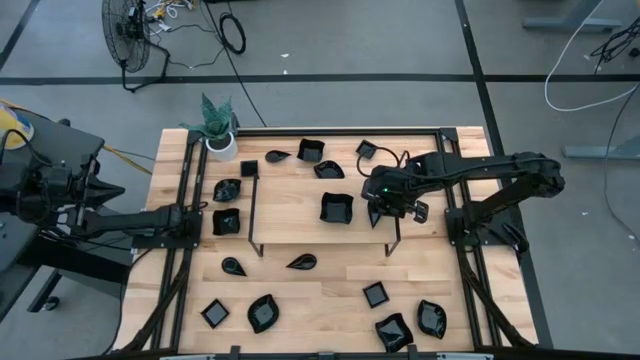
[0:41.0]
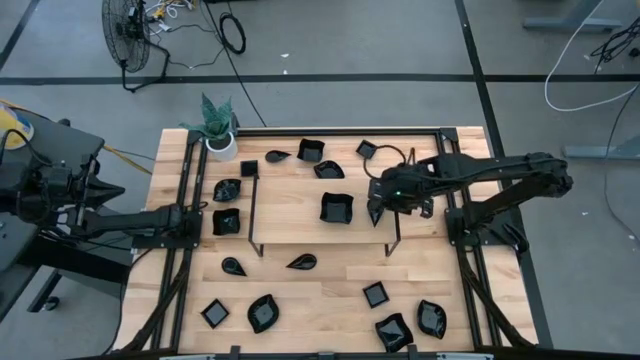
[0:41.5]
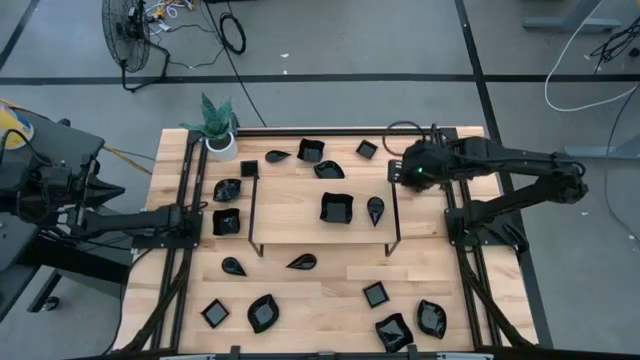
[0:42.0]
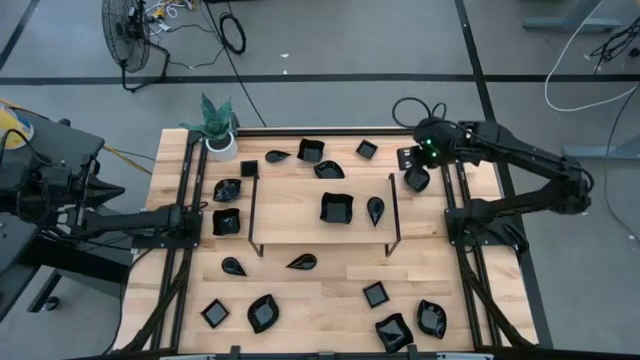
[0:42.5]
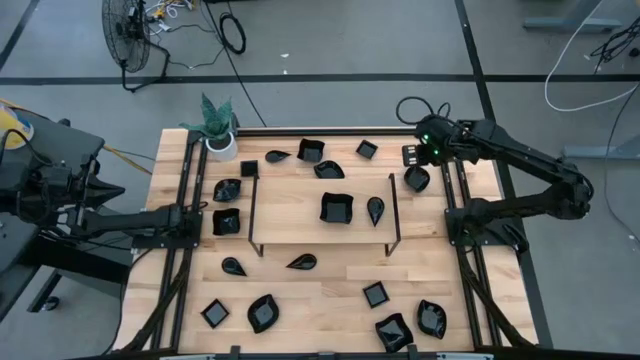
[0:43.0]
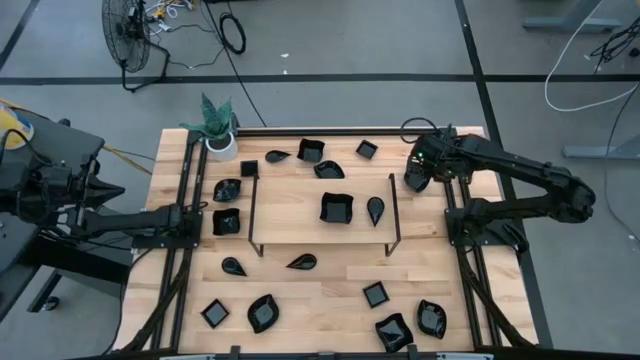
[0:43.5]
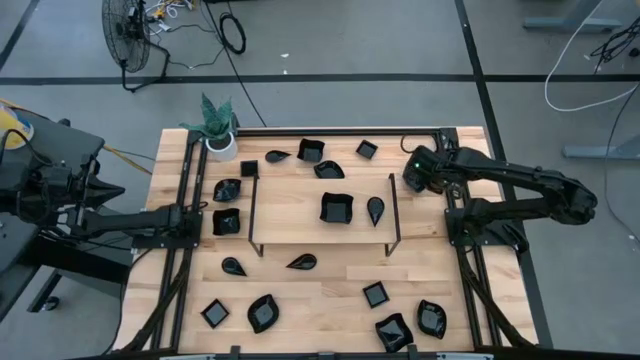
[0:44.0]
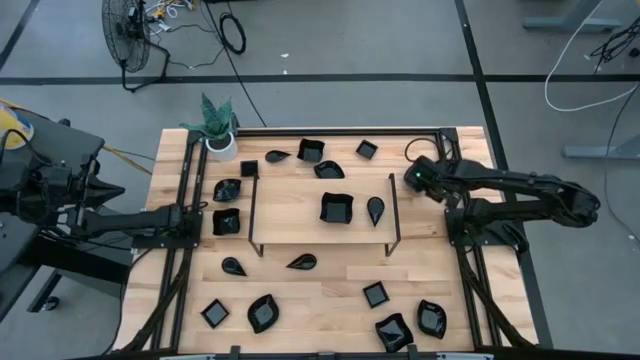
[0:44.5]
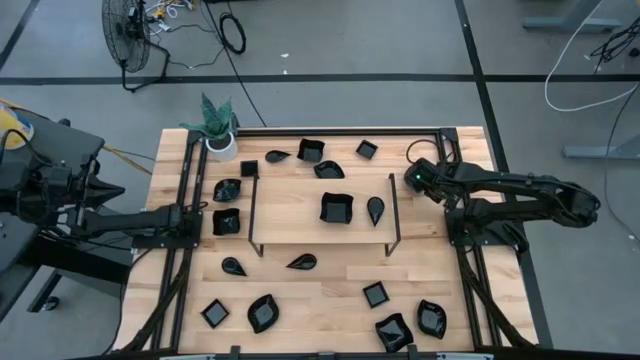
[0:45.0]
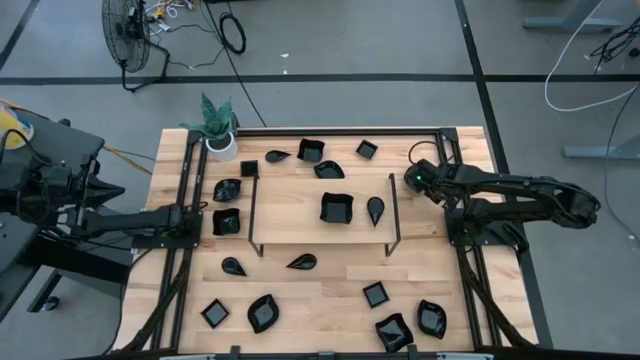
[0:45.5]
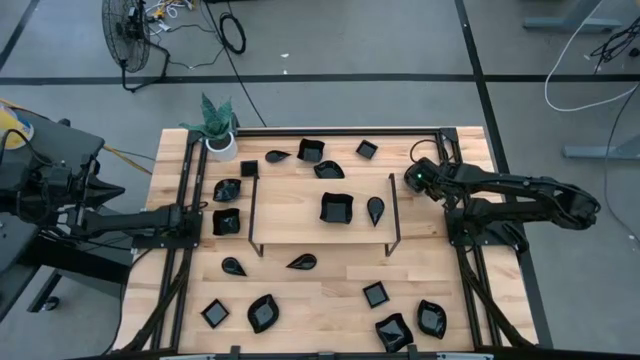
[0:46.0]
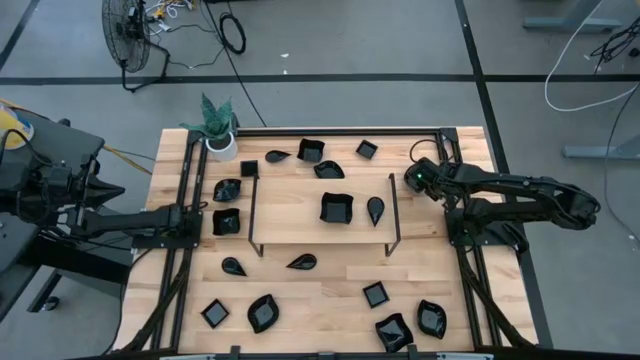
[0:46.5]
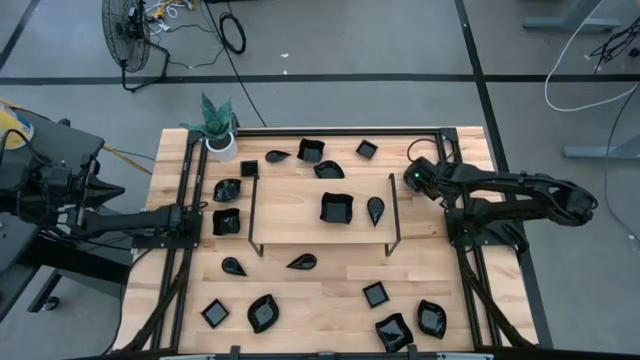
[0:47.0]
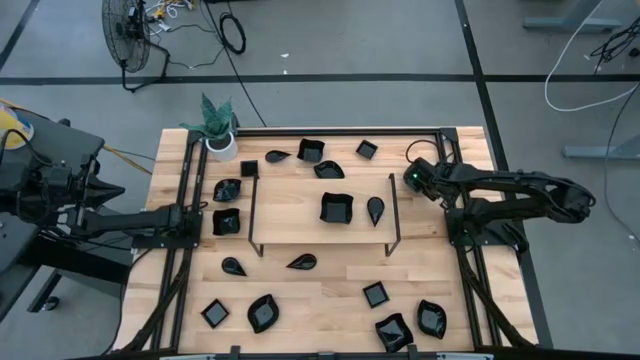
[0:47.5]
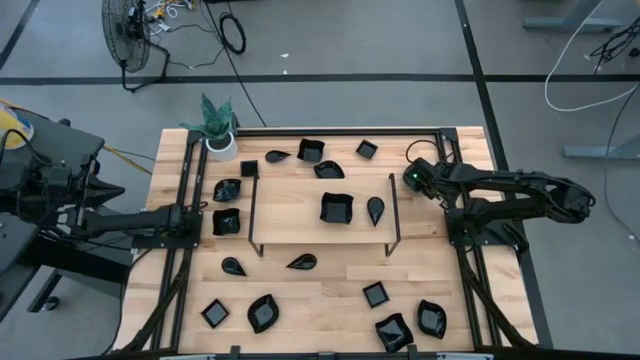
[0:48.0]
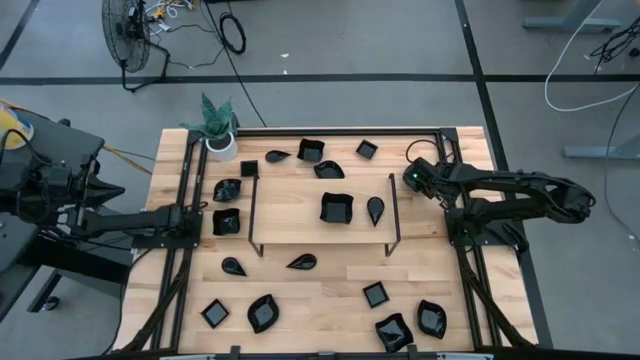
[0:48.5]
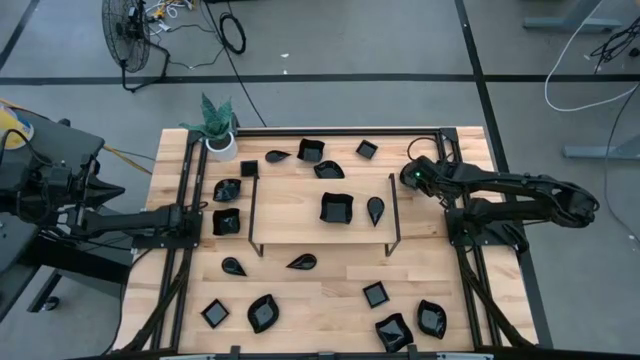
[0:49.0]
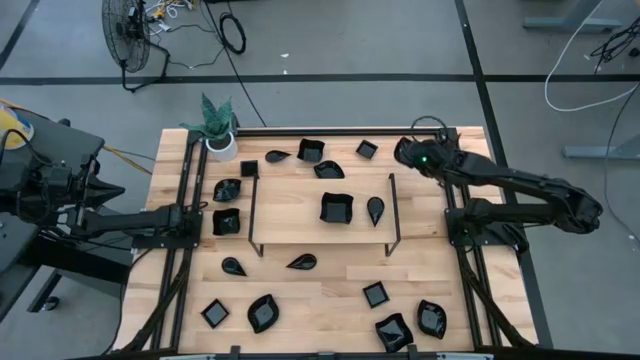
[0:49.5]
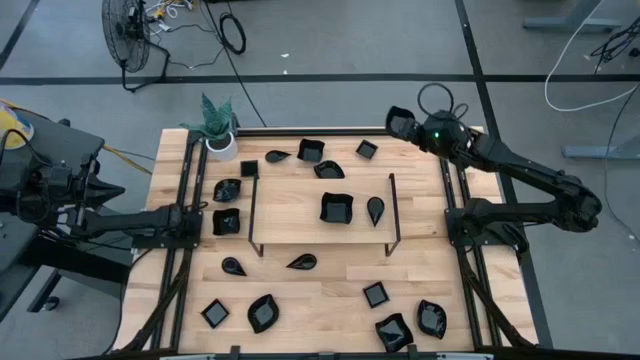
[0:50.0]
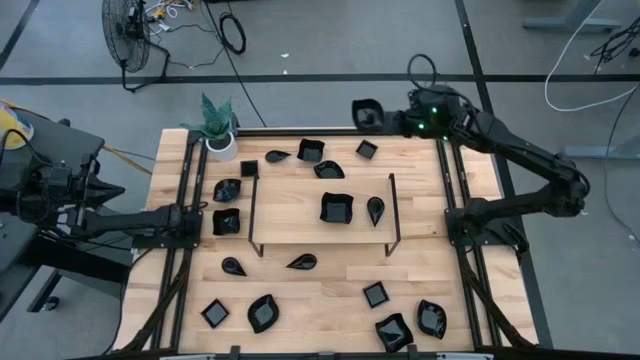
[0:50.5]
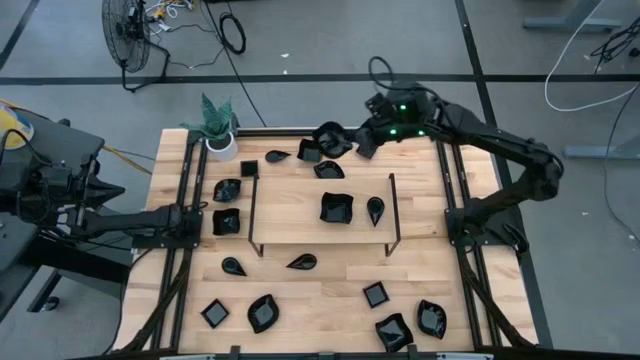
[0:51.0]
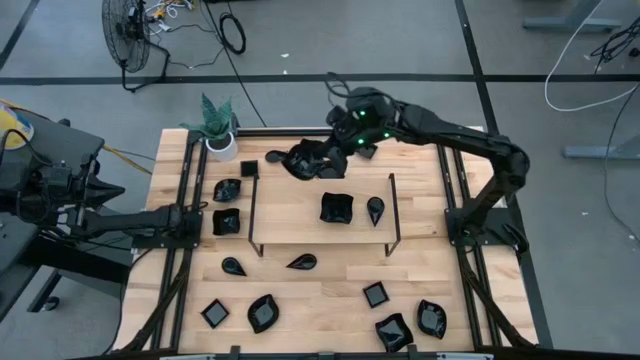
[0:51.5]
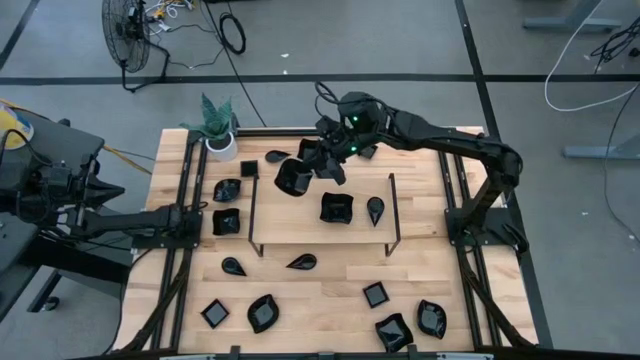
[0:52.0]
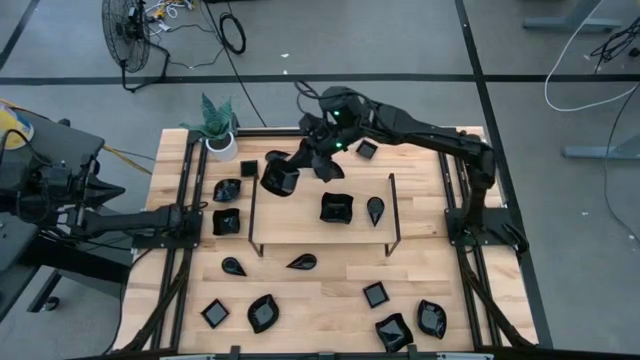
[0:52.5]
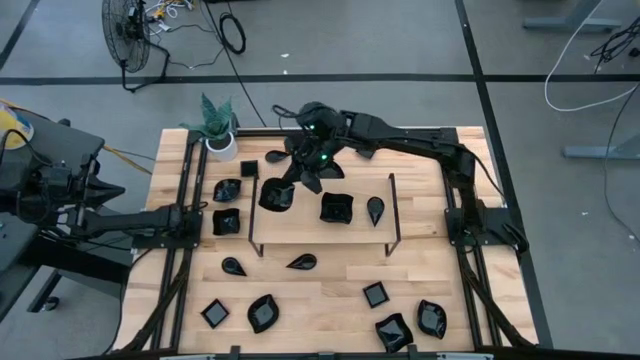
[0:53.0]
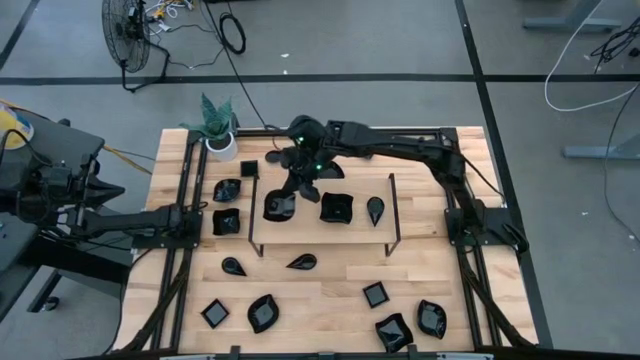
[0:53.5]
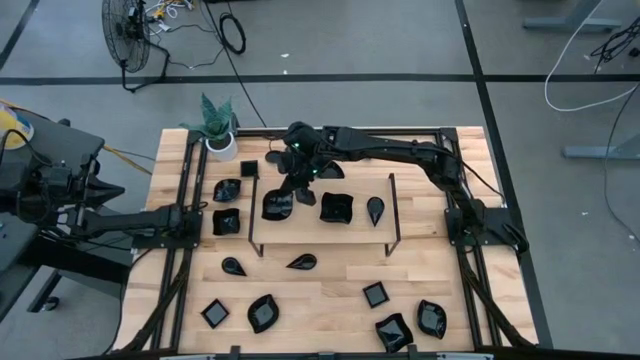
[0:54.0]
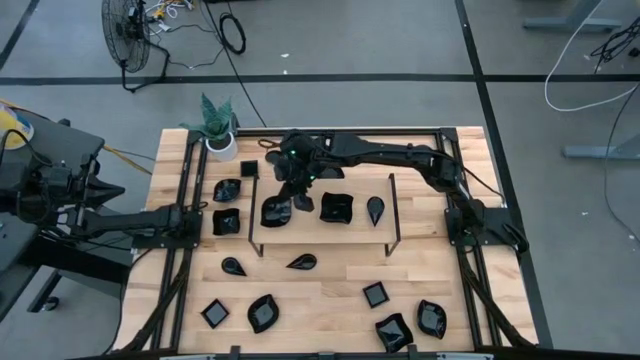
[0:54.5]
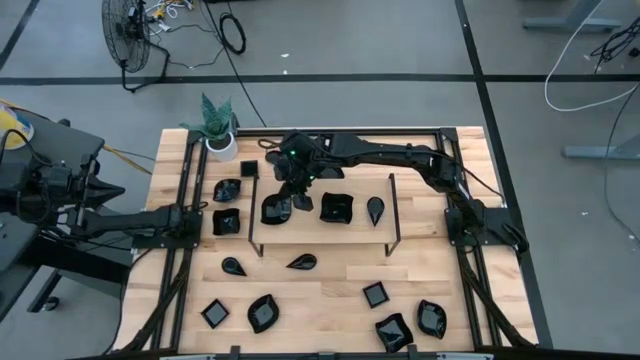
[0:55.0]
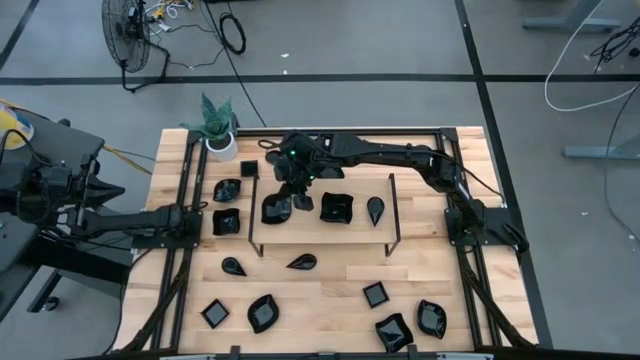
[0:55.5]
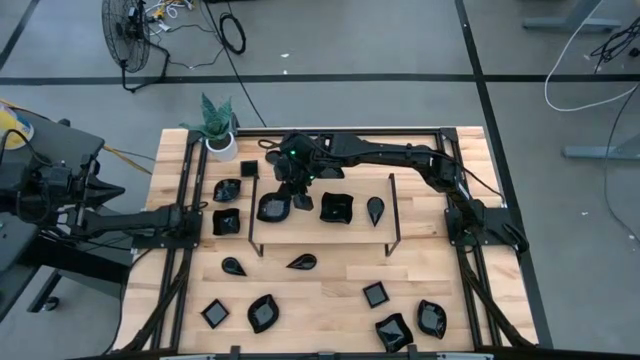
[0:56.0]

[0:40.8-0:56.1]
Task: Pick & Place Mini shaped plates
Put the leaf shaped plate on the shelf

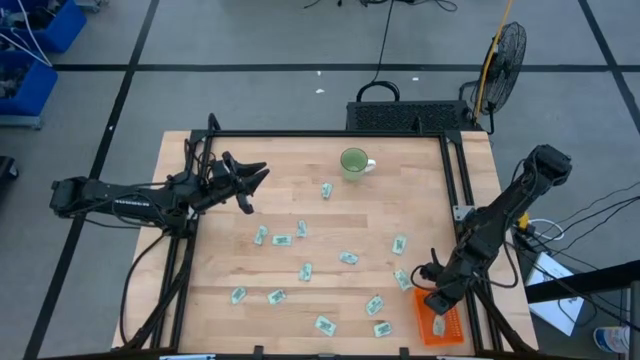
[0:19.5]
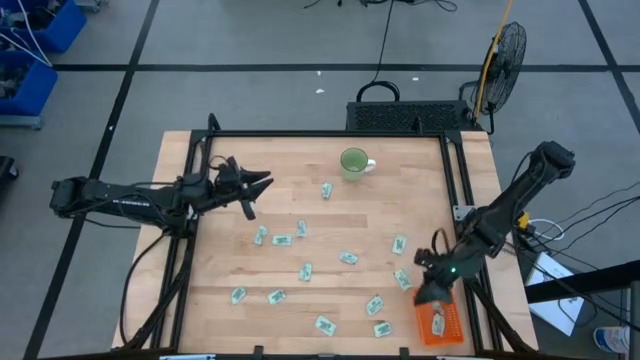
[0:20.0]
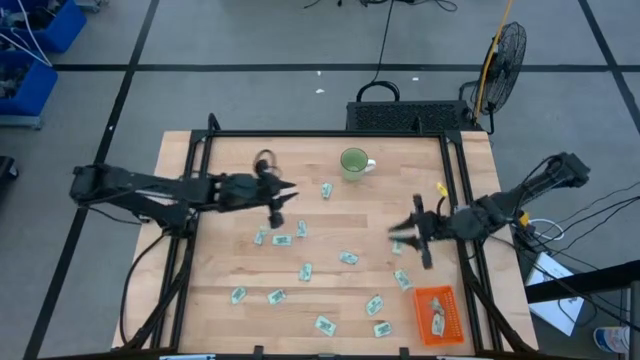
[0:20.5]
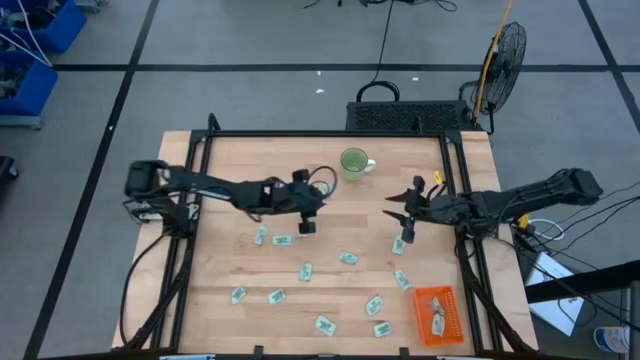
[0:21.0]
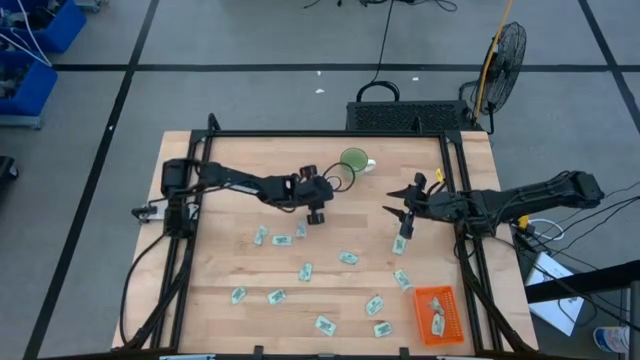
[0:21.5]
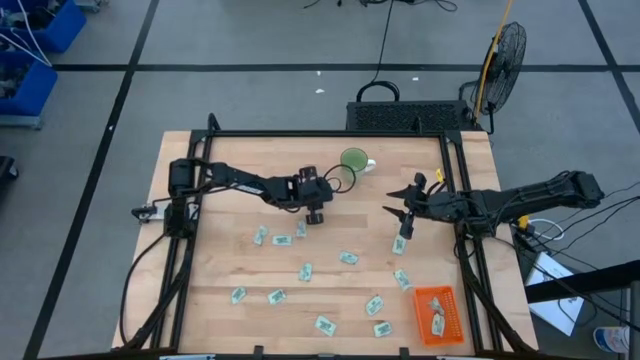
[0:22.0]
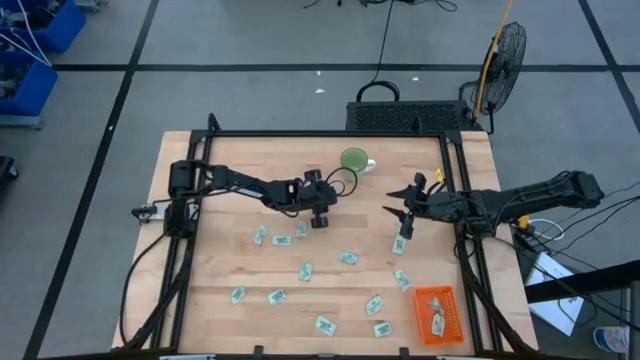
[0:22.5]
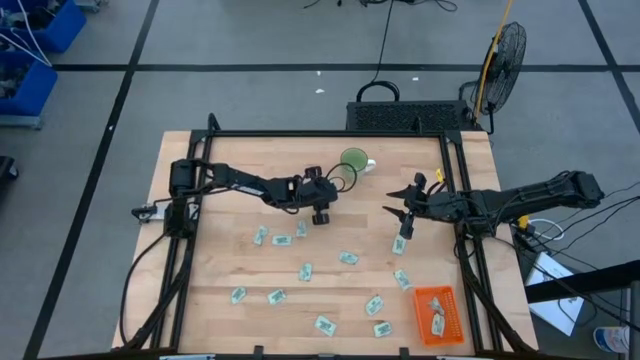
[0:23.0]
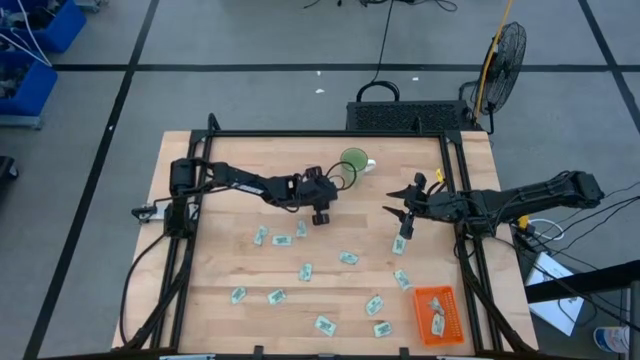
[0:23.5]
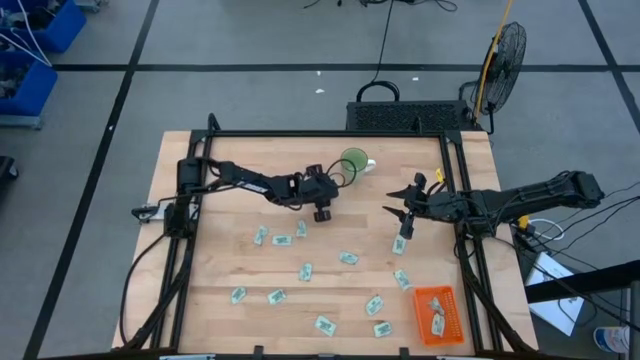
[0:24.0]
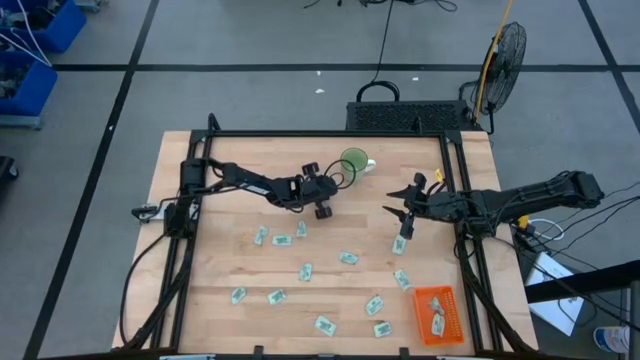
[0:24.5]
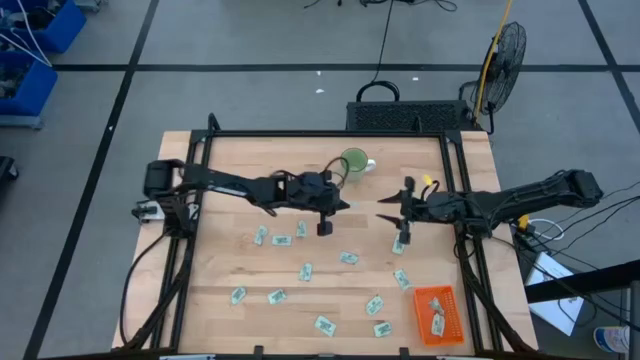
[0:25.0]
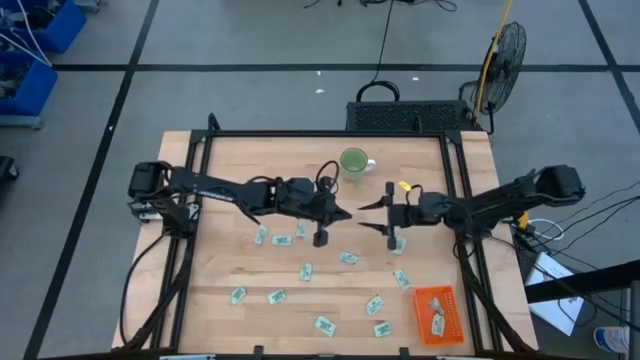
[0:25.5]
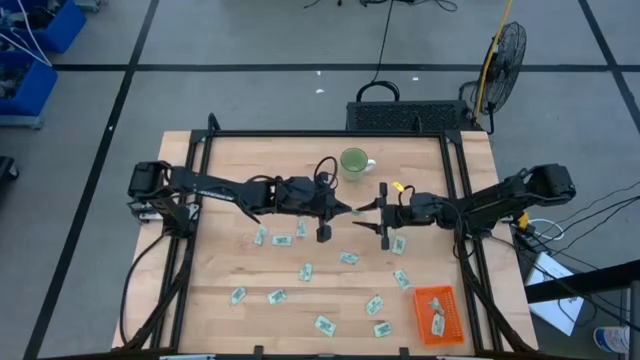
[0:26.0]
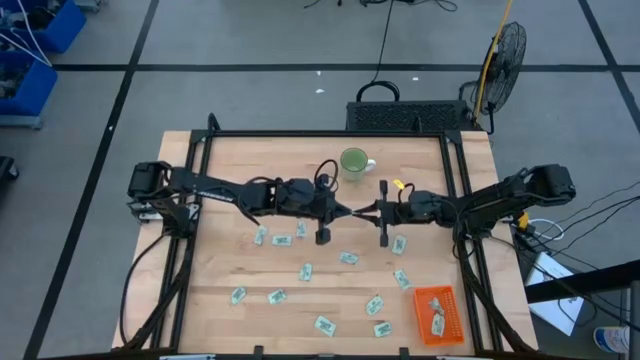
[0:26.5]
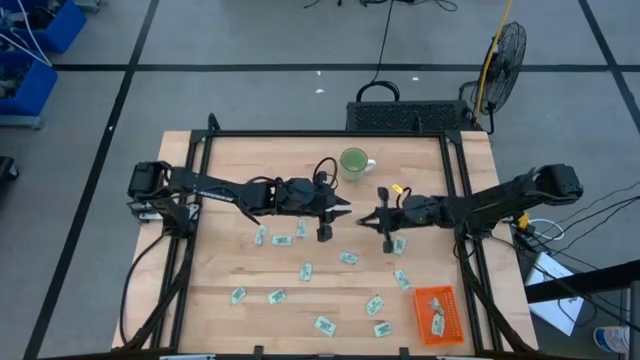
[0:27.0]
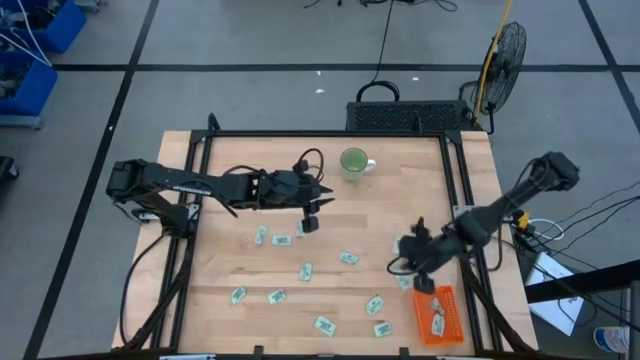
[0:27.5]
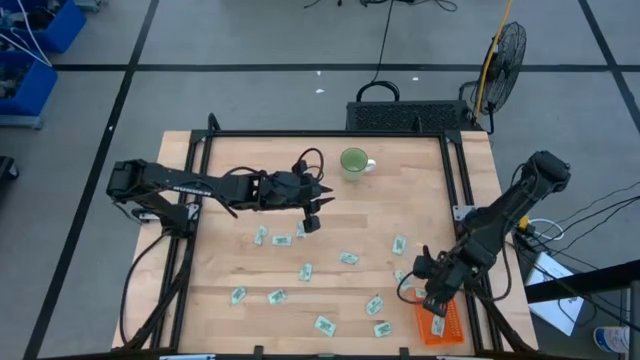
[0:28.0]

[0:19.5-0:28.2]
Task: Pick and place Stevia / Truvia into bins
Put the stevia packet into the orange bin
